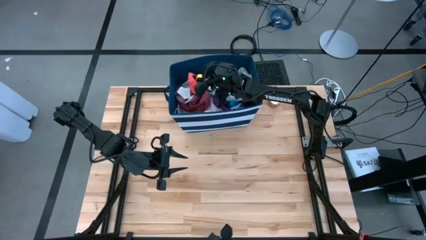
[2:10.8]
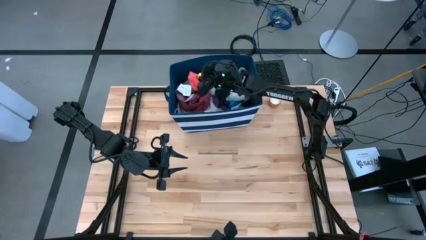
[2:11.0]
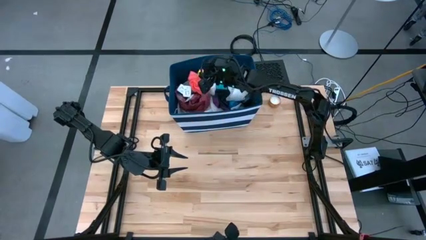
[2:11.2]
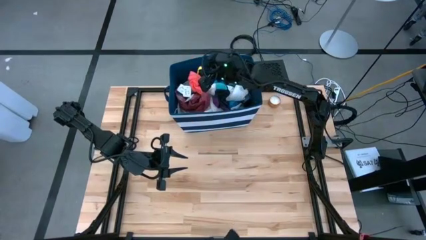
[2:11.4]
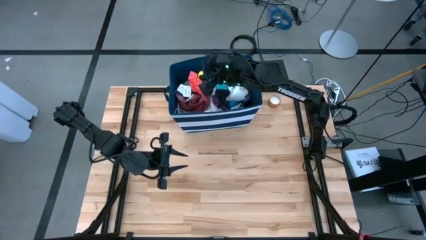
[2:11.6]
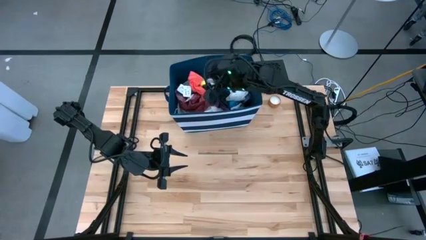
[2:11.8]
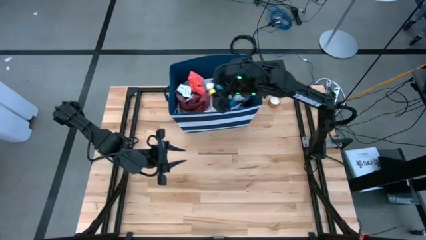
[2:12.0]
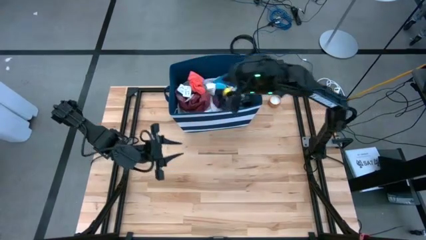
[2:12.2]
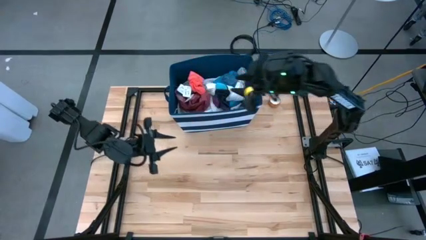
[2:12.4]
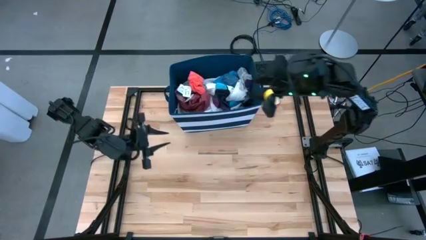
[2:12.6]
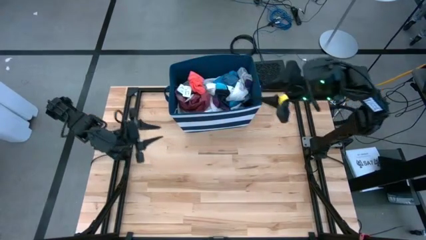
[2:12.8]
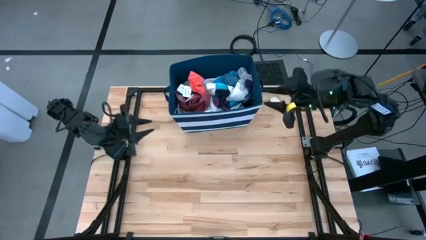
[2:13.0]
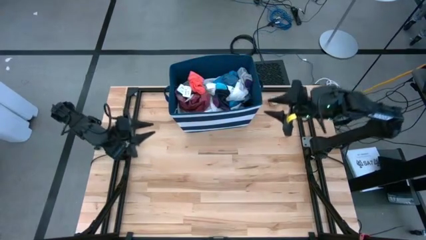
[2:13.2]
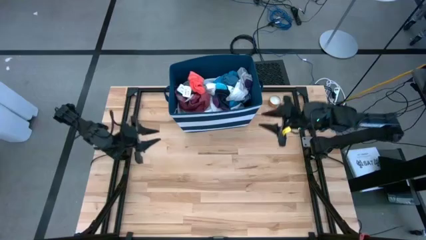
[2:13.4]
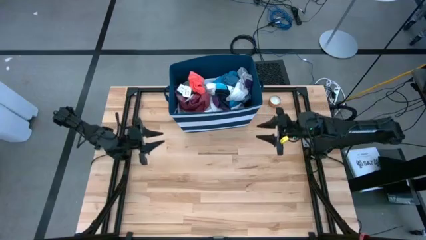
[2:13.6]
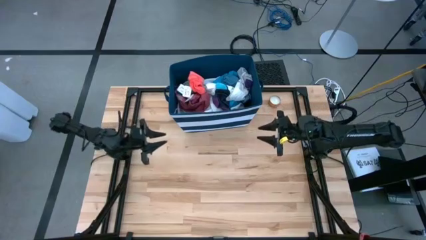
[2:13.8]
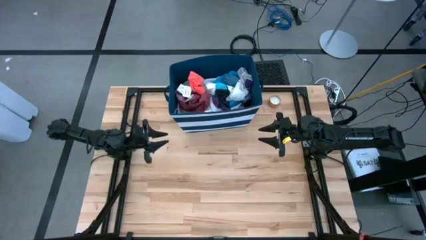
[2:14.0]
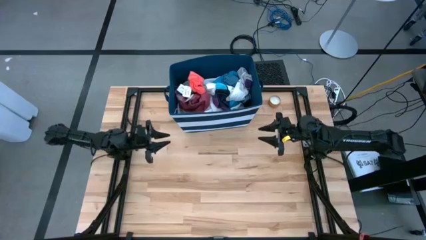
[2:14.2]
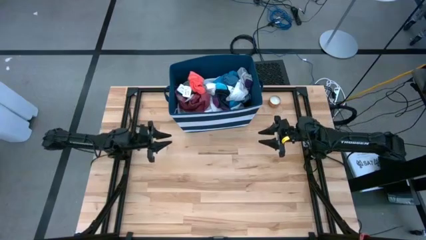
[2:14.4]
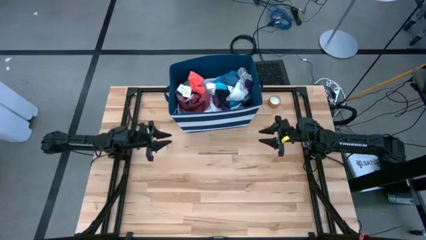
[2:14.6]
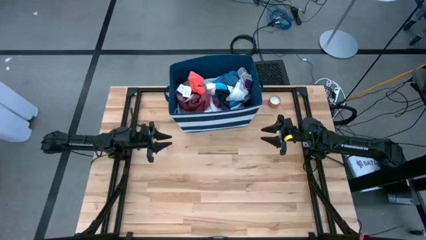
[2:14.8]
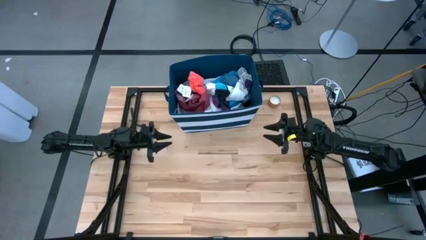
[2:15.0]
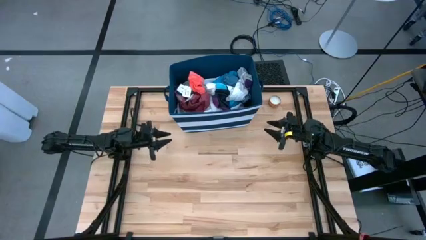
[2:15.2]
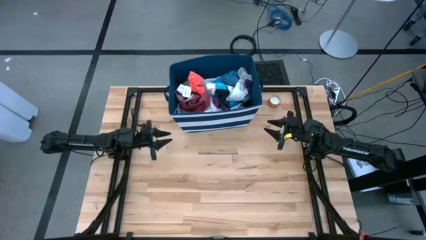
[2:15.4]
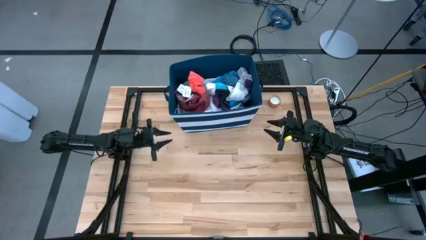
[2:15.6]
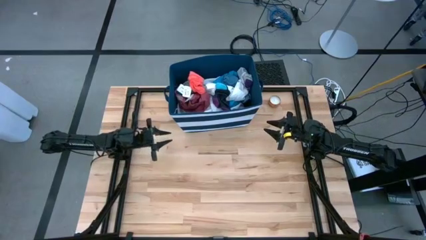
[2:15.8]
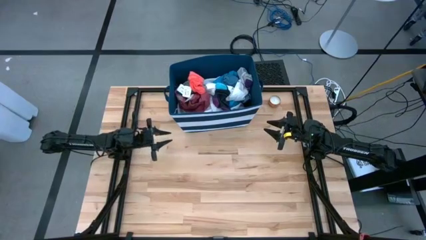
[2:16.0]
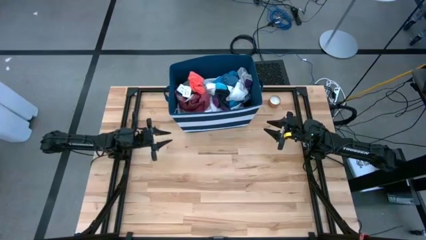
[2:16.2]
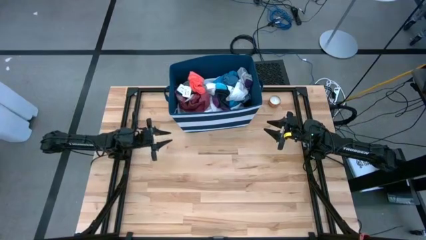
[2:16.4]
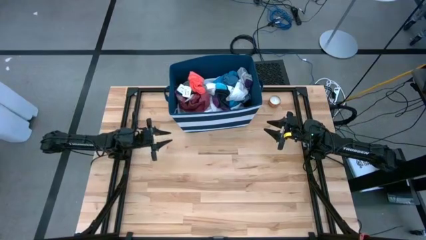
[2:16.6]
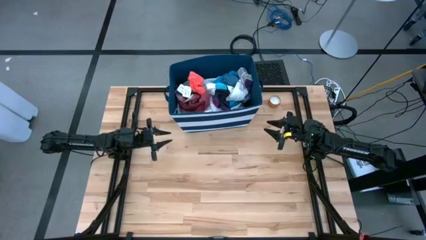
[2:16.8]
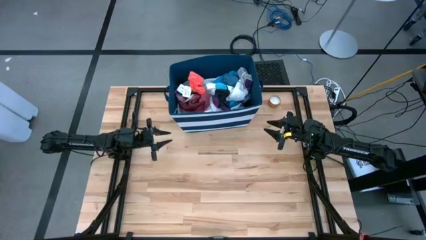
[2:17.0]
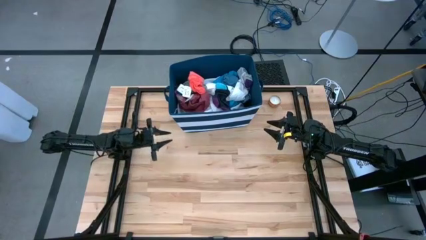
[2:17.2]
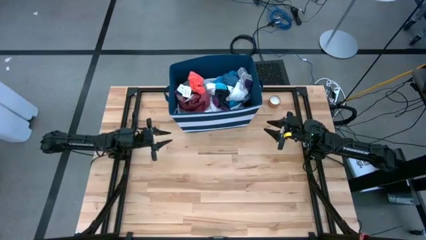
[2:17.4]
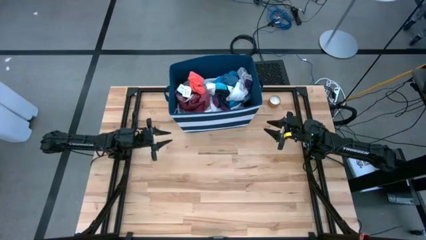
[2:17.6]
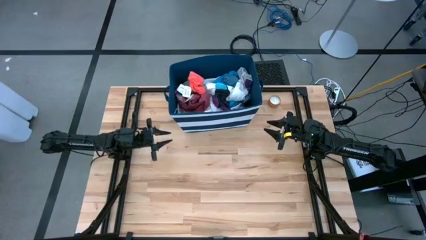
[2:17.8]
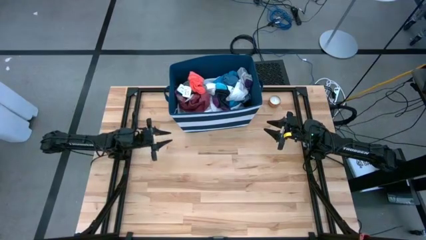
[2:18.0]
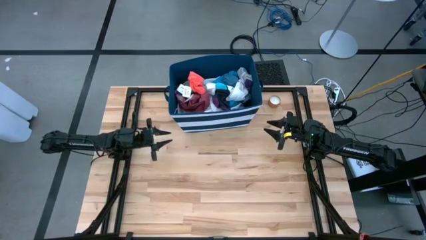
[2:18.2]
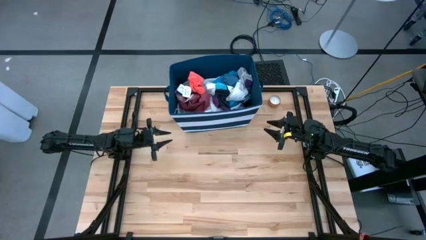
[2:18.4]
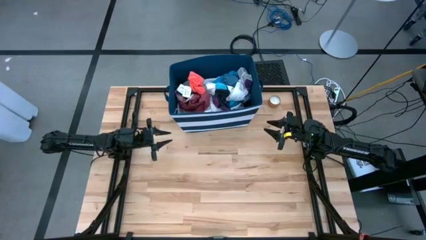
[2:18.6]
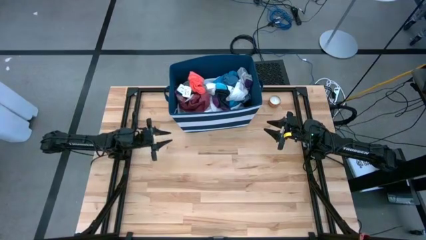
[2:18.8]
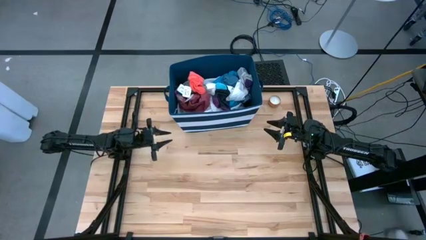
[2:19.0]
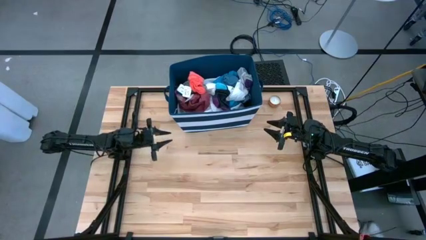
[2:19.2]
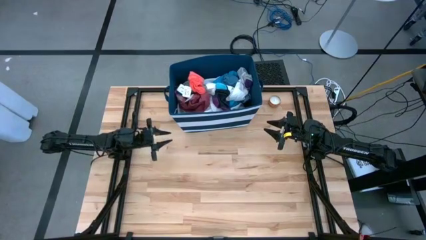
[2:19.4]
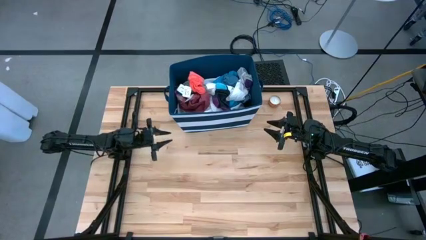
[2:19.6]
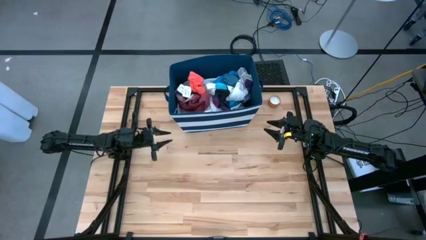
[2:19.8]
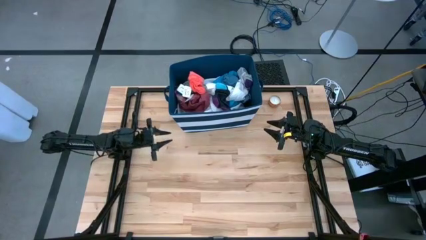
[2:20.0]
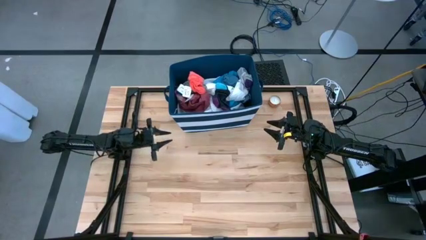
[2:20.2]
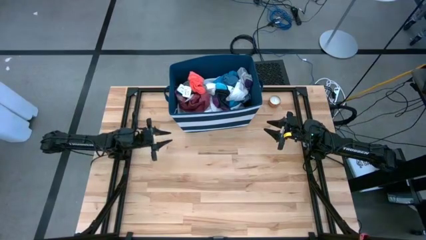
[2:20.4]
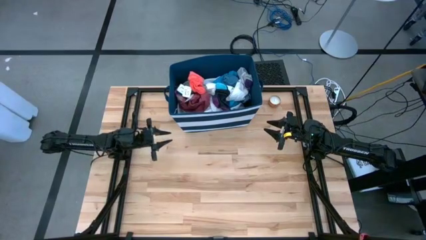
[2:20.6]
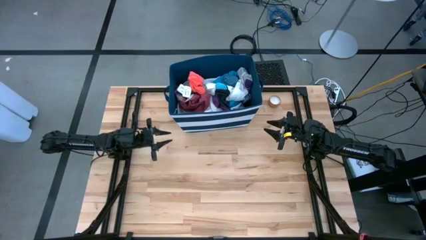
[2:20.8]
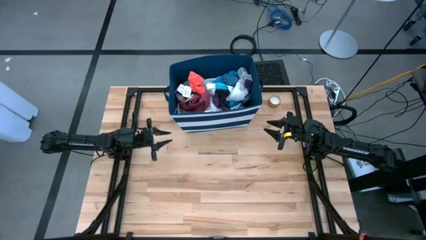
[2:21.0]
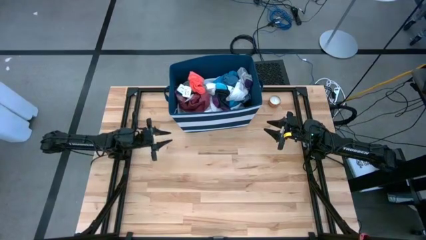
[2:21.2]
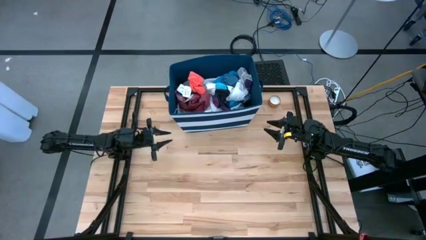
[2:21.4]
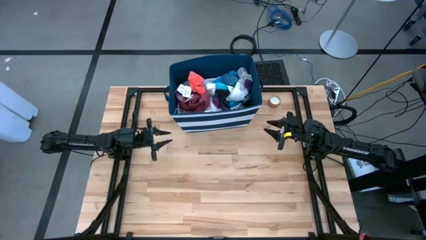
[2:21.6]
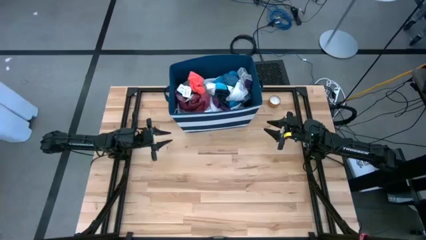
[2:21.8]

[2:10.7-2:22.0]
Task: Sort clothes
Return to Home Position
